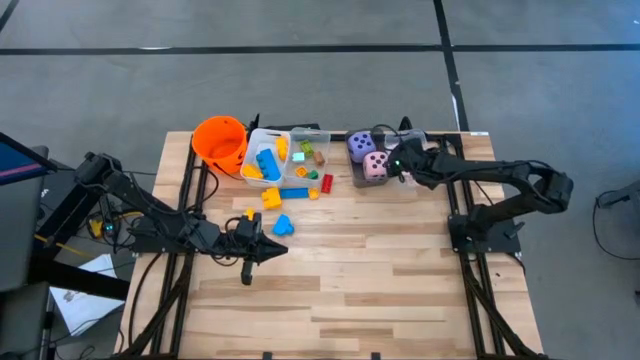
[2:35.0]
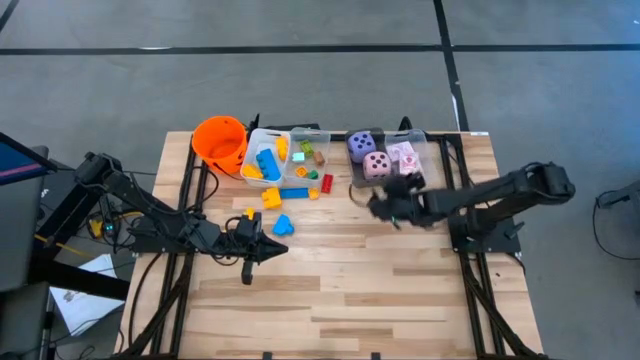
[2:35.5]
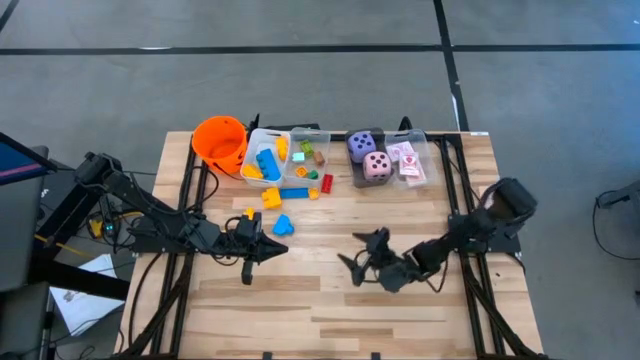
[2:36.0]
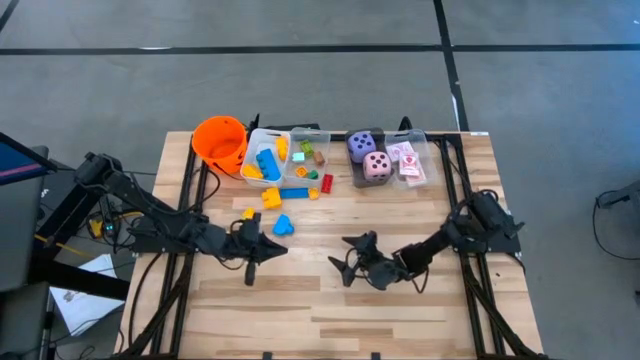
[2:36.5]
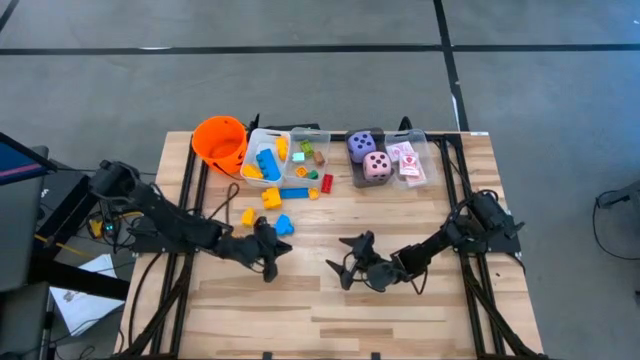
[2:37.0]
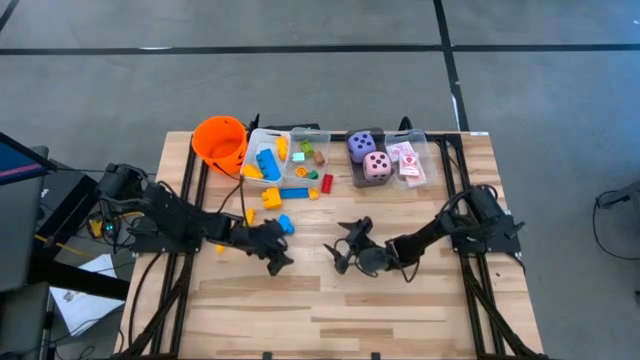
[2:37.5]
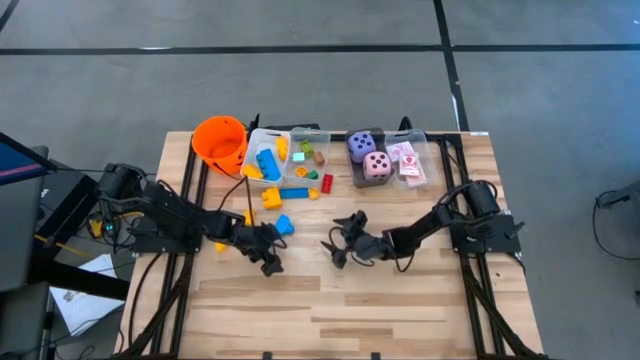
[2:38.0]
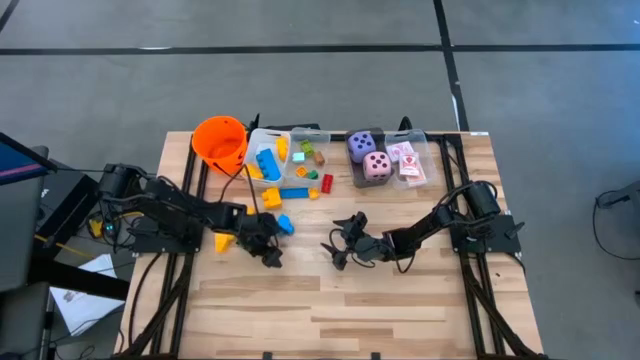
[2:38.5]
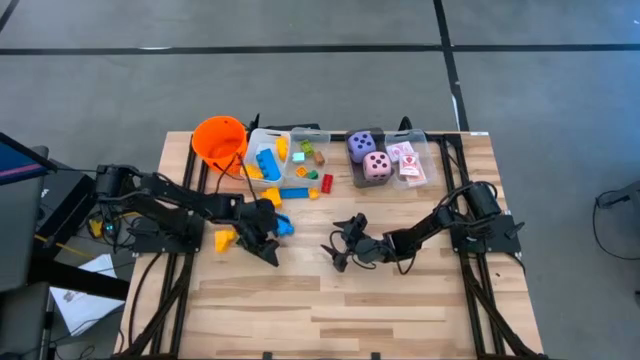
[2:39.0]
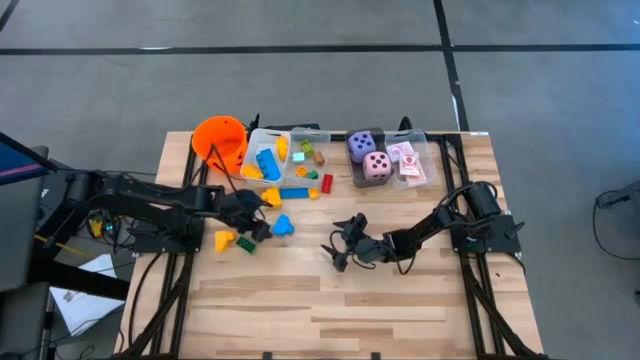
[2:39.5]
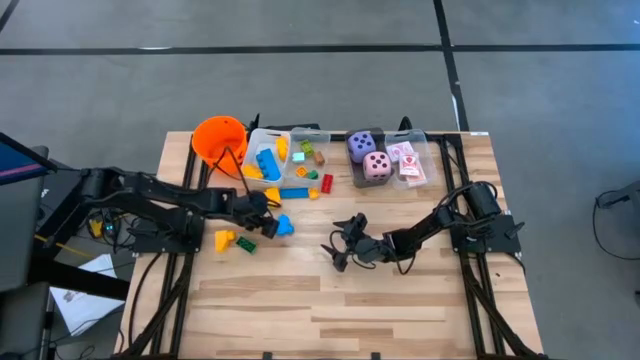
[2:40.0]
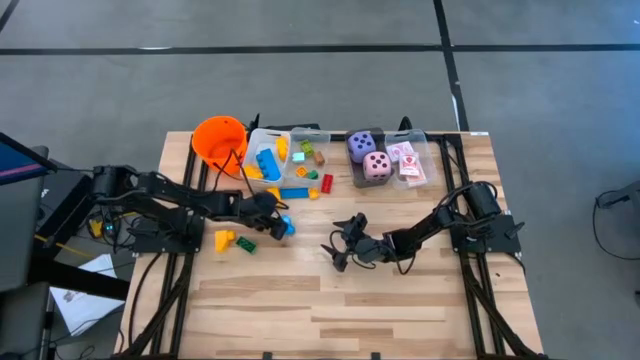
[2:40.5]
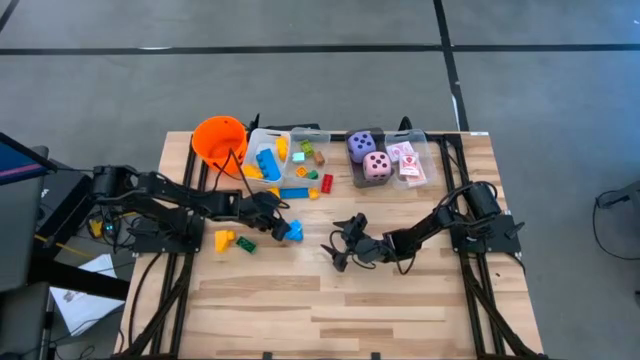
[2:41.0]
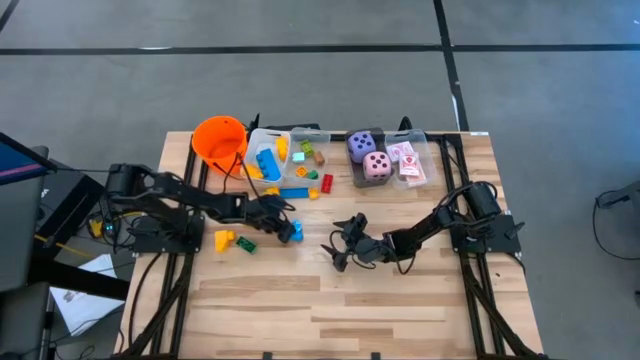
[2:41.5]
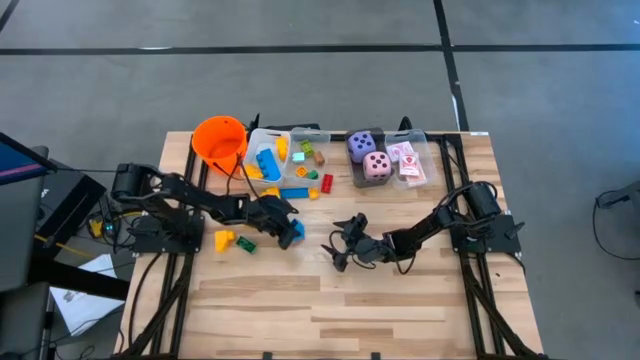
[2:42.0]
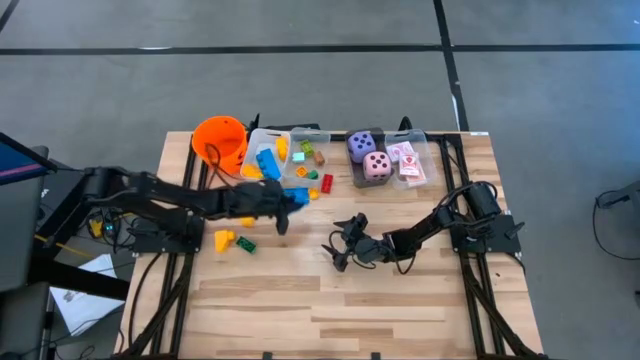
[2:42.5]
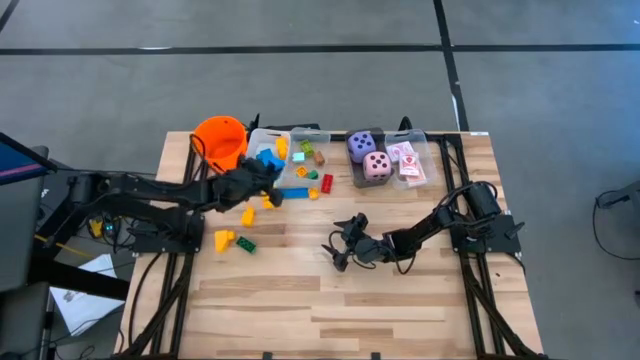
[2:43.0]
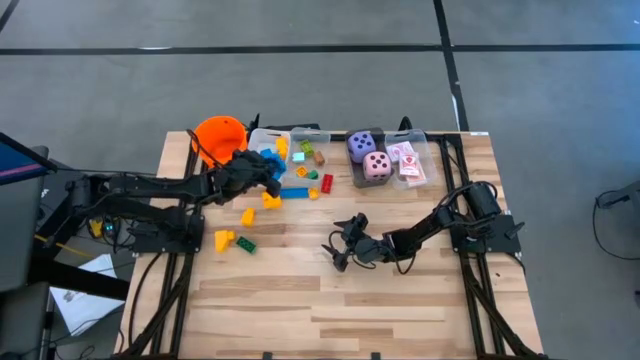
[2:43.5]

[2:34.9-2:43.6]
Task: Pick & Place Toys
Put the large blue game piece into the white bin

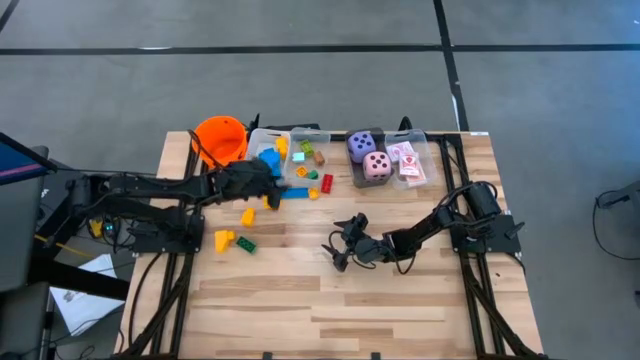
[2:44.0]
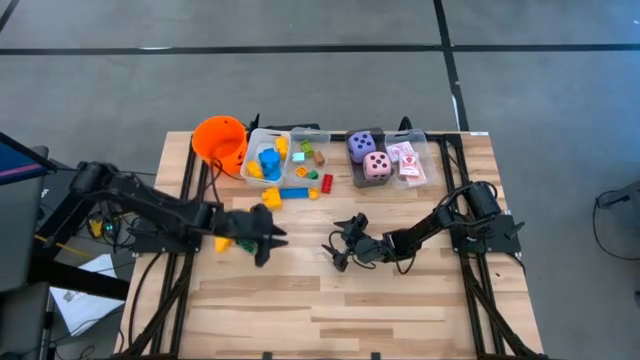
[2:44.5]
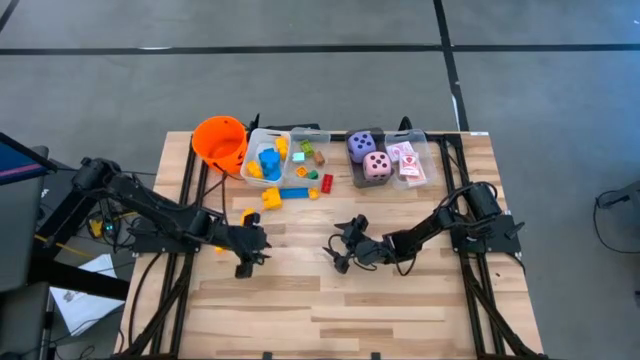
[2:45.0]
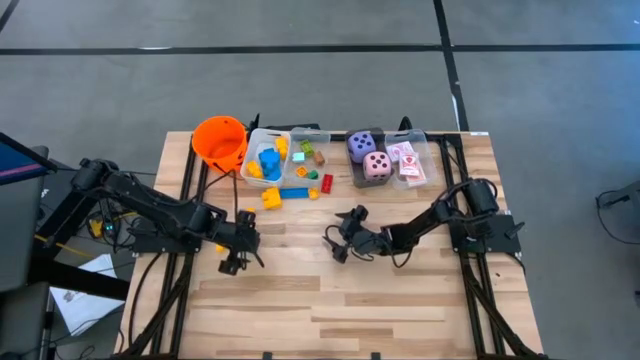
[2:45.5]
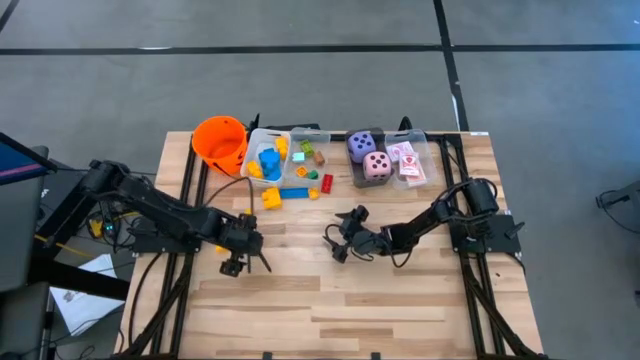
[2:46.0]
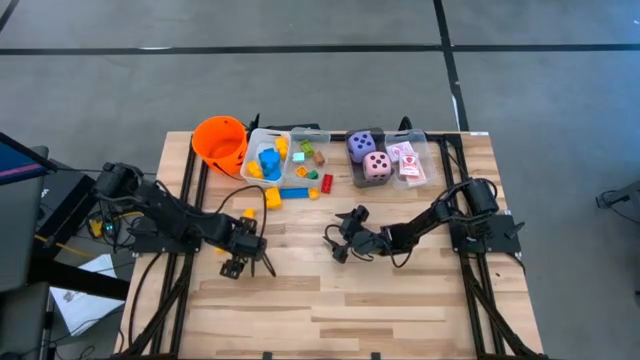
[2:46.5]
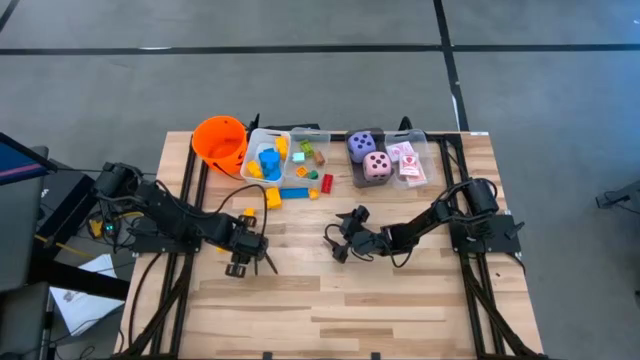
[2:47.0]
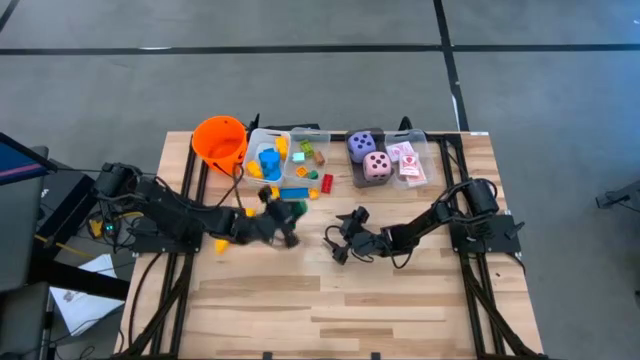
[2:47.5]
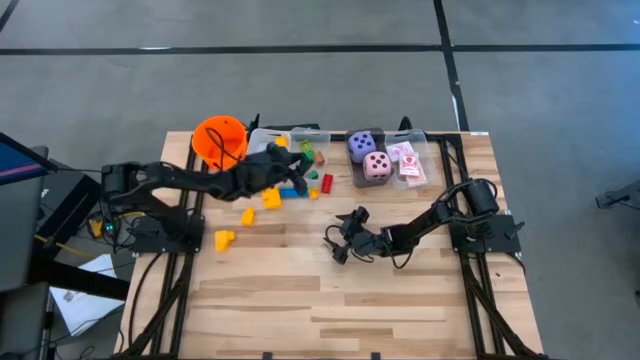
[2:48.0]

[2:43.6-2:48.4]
Put the small green game piece into the left transparent bin

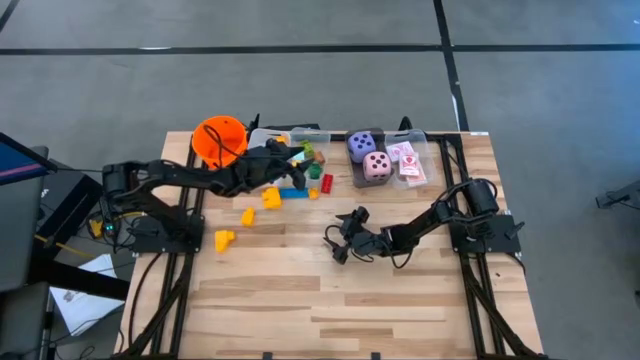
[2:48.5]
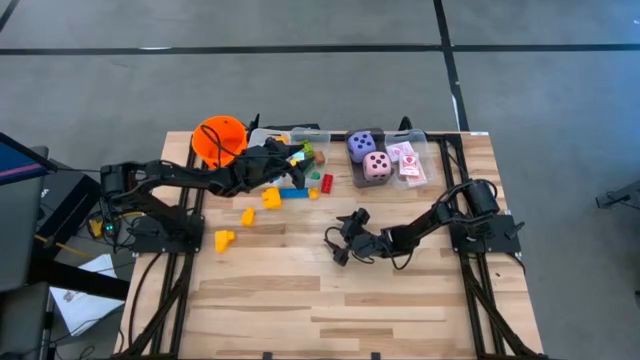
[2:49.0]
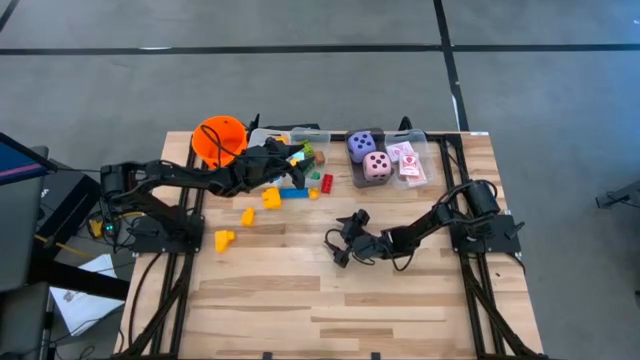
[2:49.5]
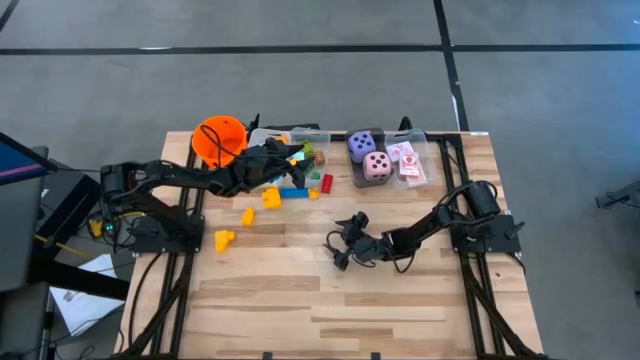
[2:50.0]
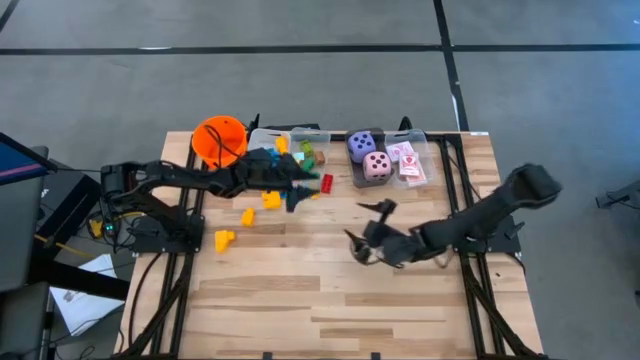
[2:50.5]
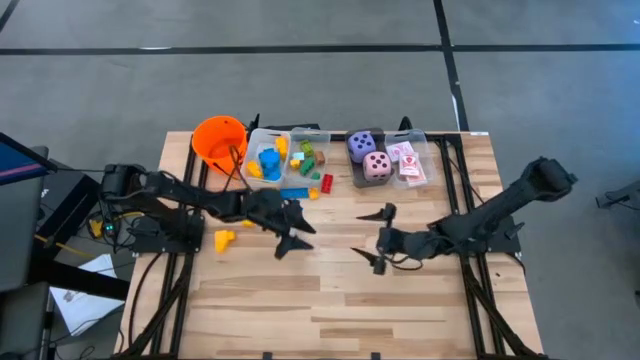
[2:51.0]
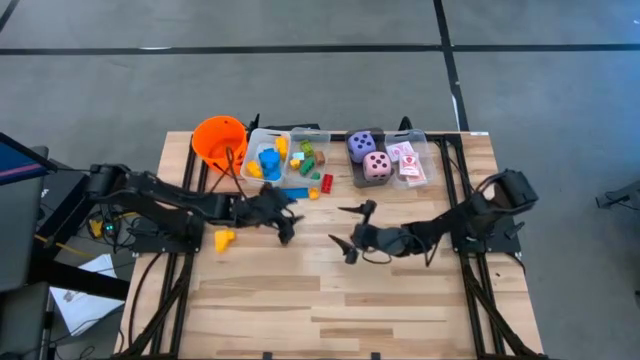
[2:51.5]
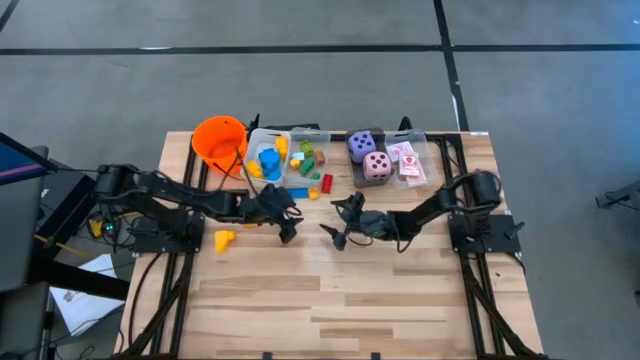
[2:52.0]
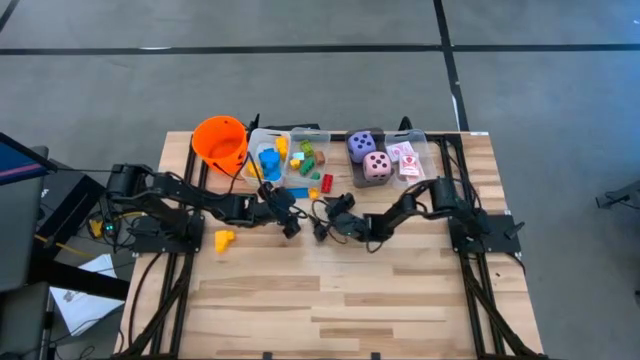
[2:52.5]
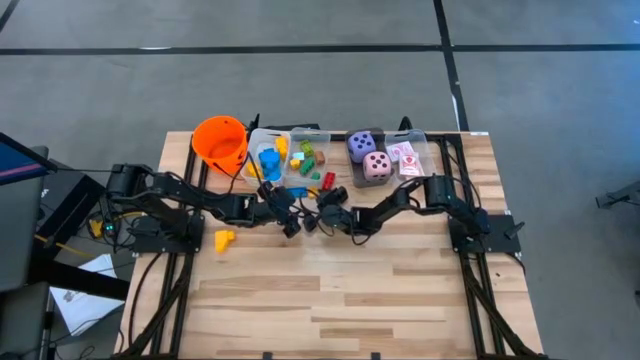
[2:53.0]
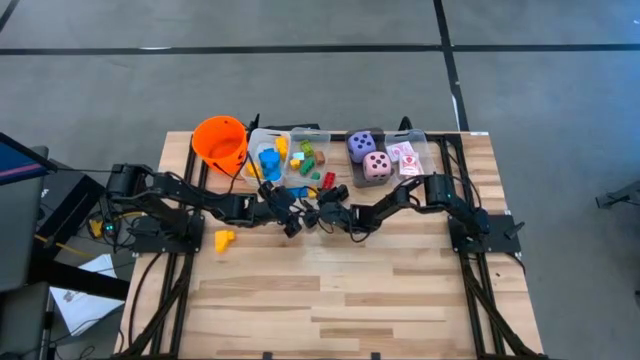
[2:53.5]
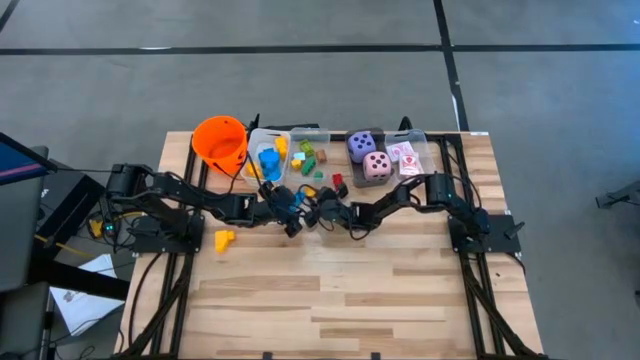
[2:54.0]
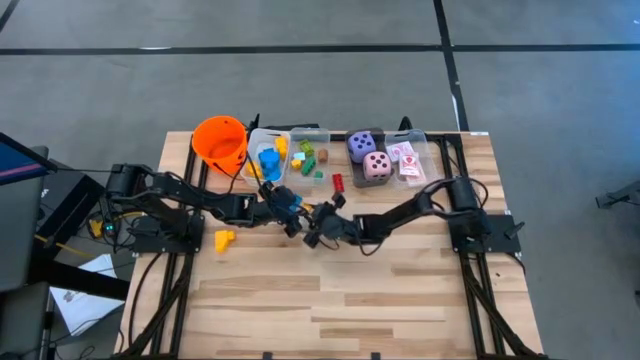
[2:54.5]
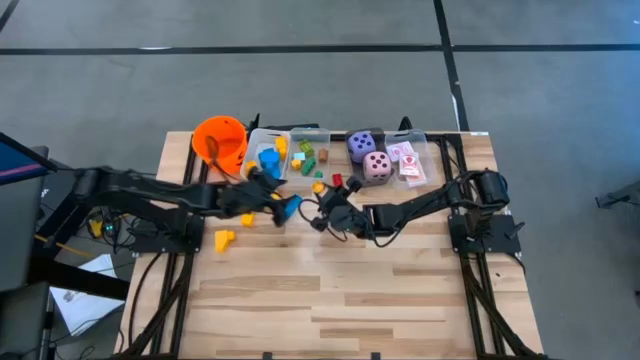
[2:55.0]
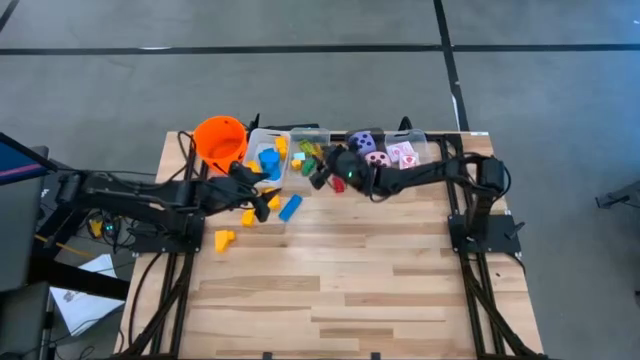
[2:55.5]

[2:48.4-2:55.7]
Put the small yellow game piece into the left transparent bin

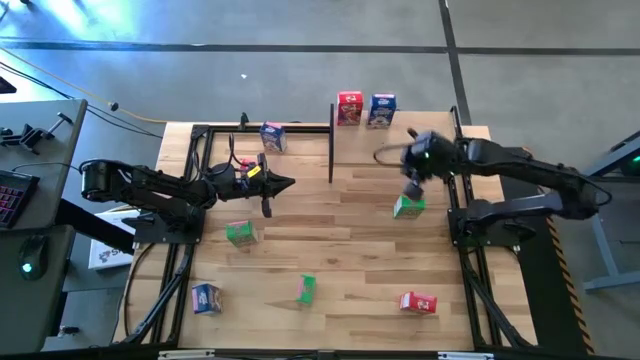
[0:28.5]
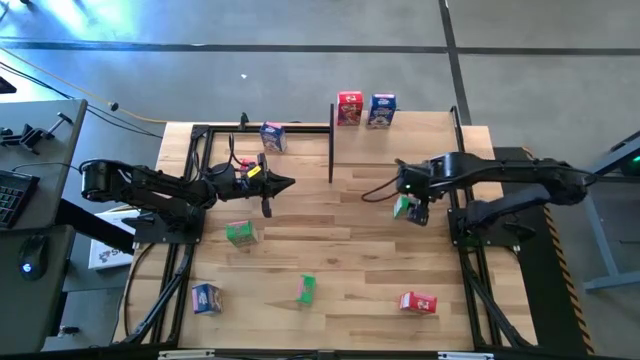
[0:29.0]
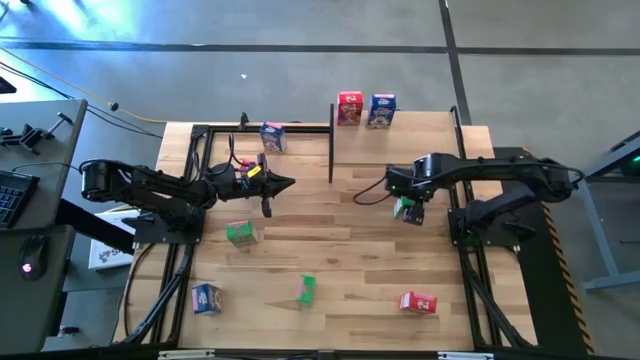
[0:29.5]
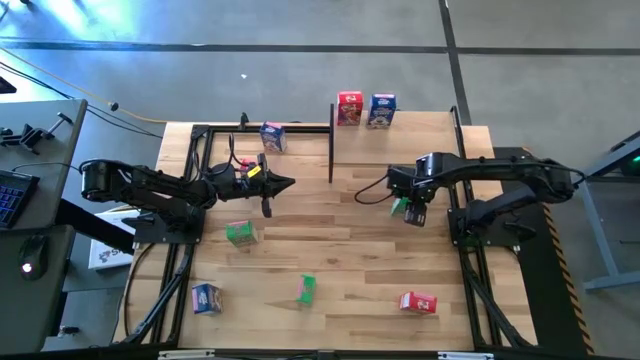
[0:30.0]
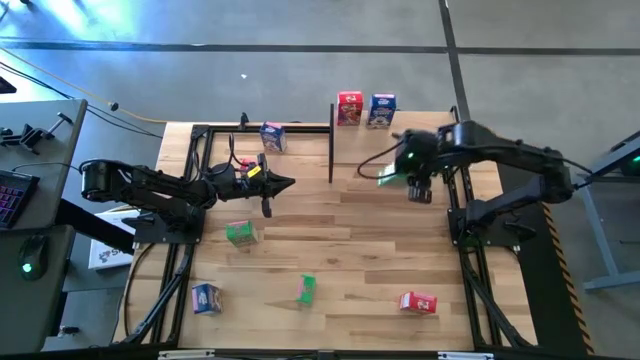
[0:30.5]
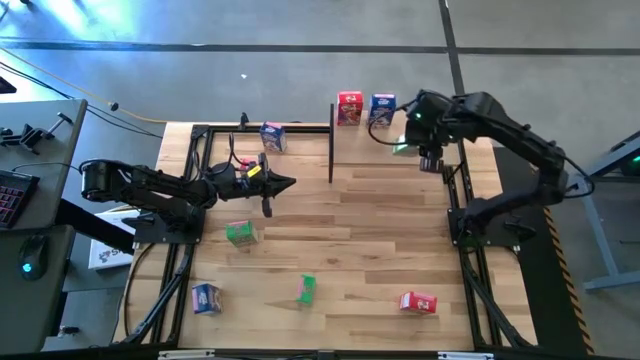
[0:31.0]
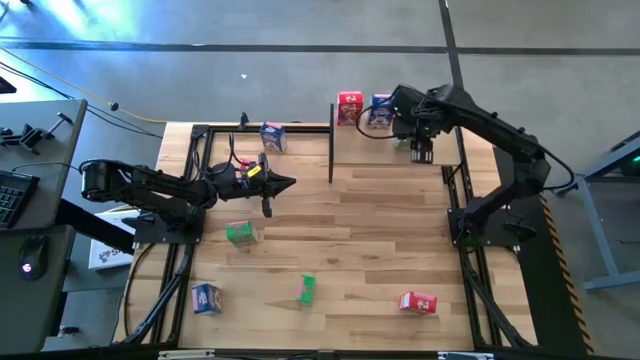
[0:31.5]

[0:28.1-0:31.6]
Task: Stack cereal on shelf
Put the top right green cereal box on the shelf to the right of the blue cereal box
